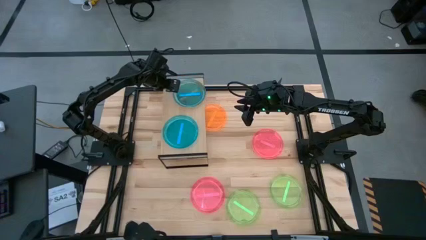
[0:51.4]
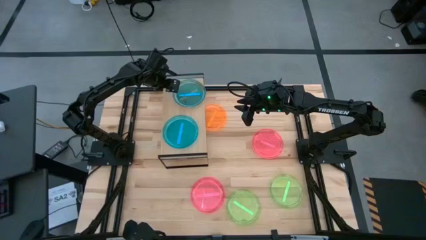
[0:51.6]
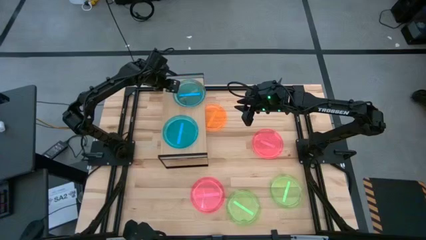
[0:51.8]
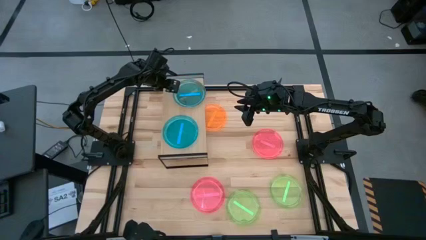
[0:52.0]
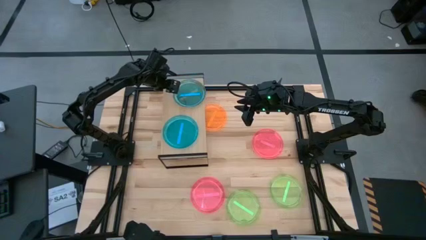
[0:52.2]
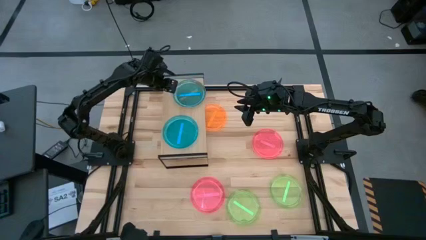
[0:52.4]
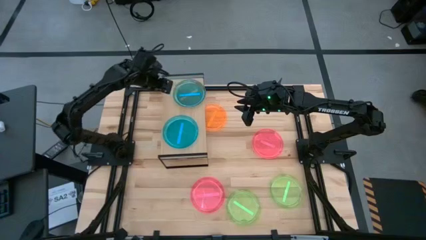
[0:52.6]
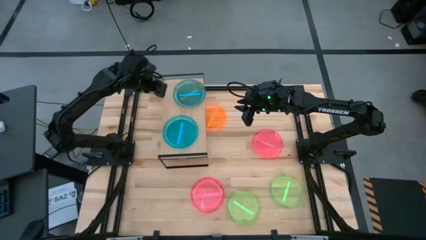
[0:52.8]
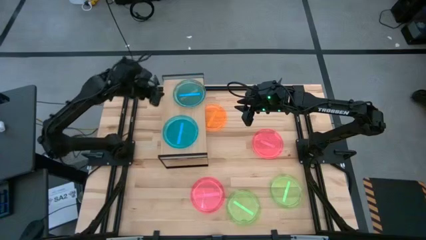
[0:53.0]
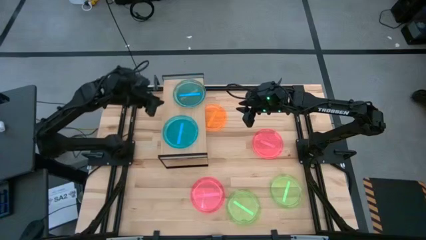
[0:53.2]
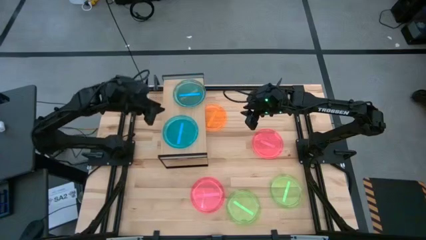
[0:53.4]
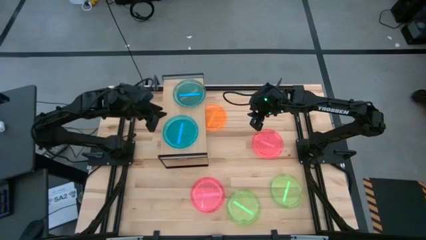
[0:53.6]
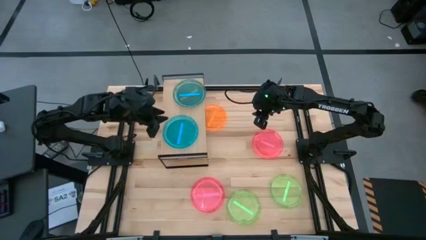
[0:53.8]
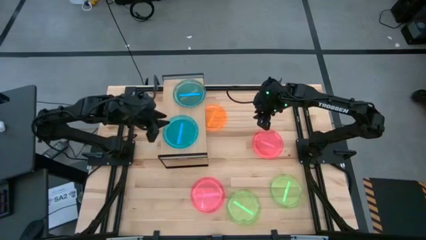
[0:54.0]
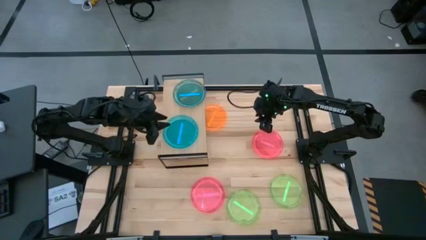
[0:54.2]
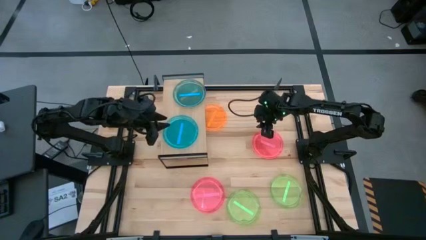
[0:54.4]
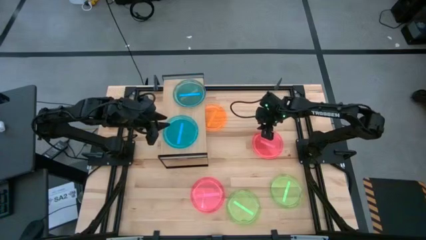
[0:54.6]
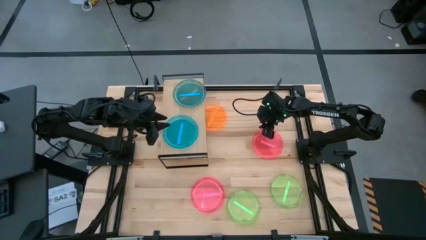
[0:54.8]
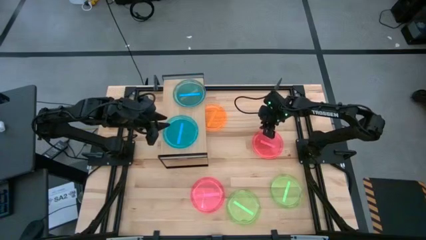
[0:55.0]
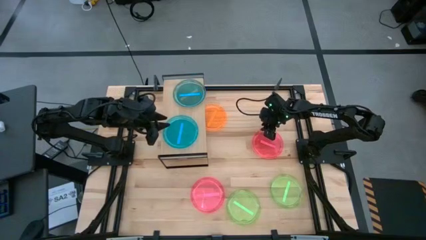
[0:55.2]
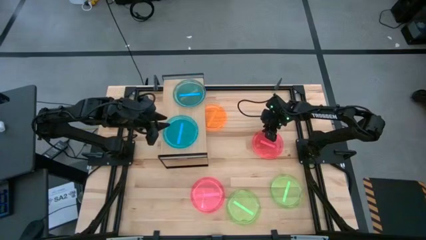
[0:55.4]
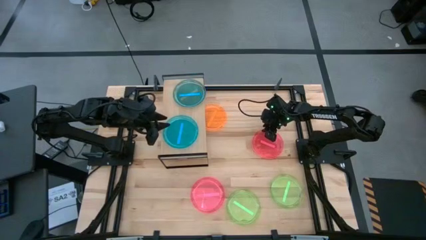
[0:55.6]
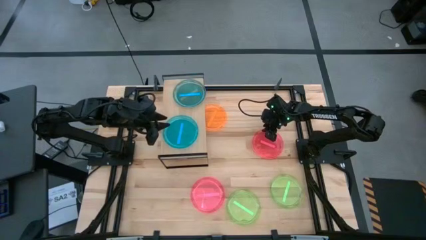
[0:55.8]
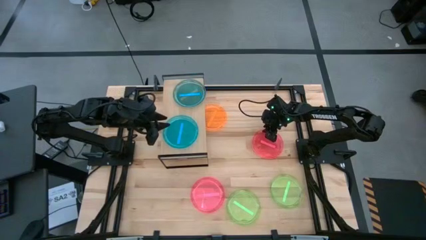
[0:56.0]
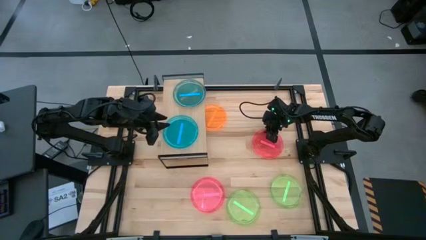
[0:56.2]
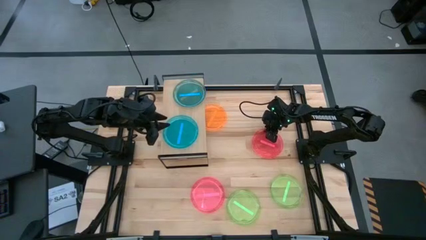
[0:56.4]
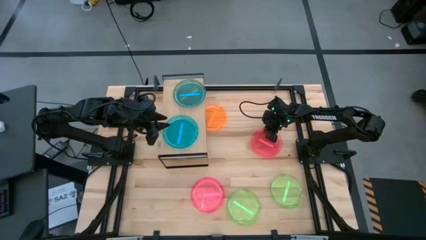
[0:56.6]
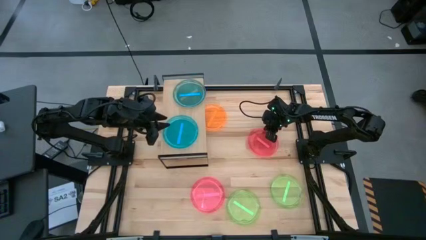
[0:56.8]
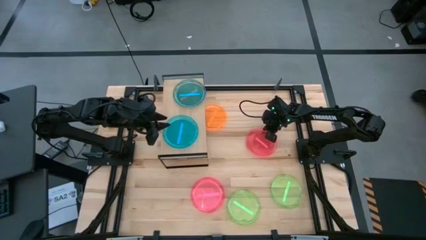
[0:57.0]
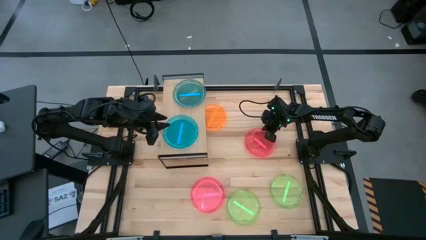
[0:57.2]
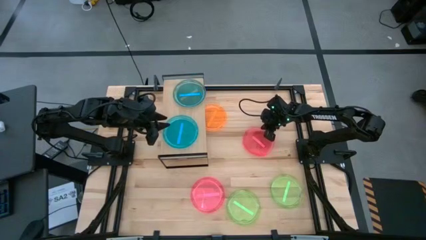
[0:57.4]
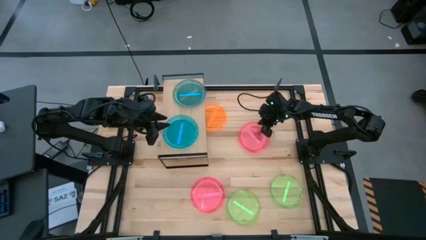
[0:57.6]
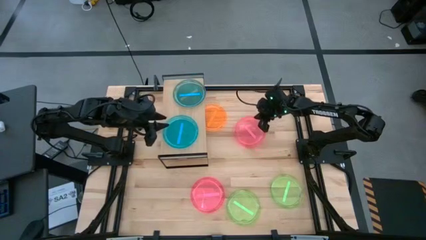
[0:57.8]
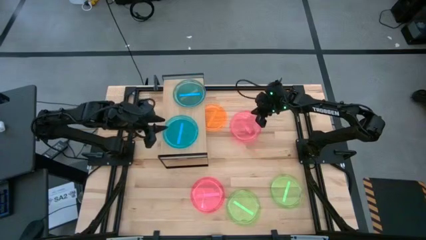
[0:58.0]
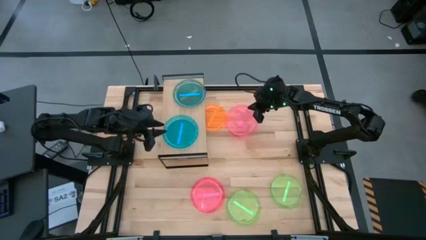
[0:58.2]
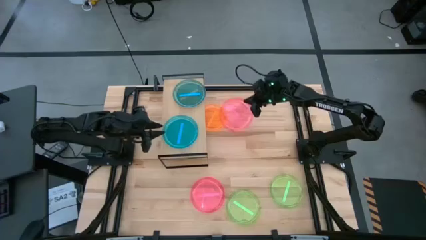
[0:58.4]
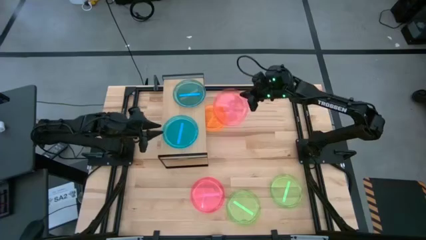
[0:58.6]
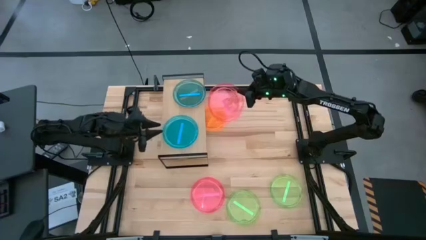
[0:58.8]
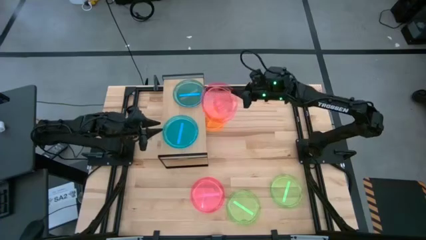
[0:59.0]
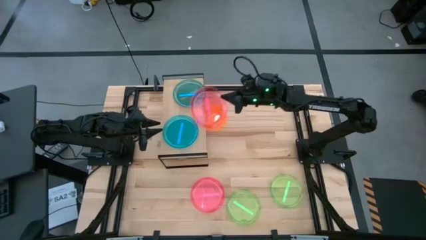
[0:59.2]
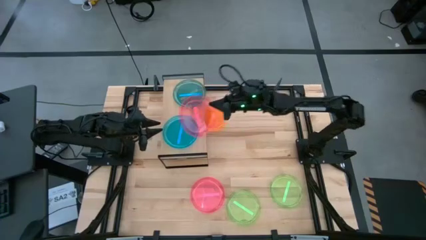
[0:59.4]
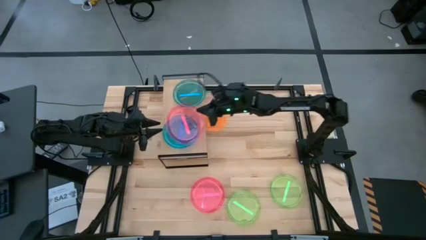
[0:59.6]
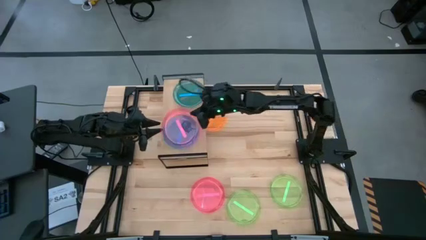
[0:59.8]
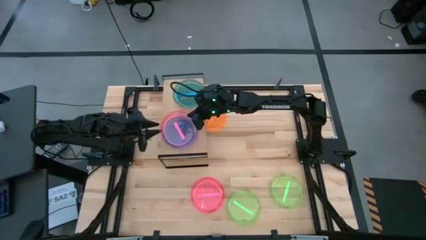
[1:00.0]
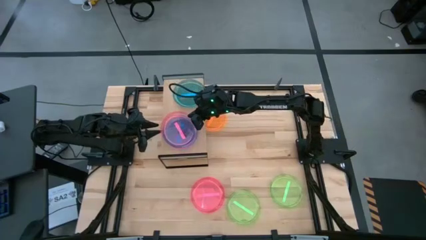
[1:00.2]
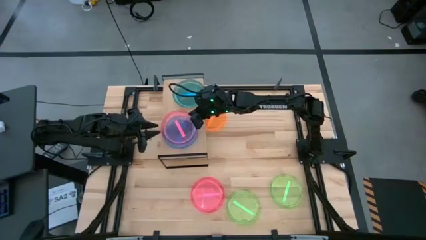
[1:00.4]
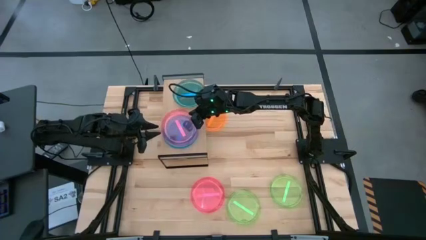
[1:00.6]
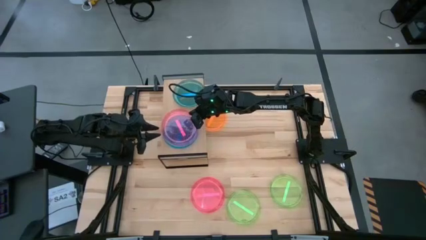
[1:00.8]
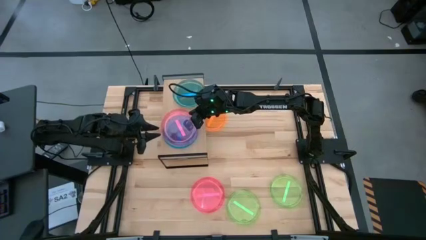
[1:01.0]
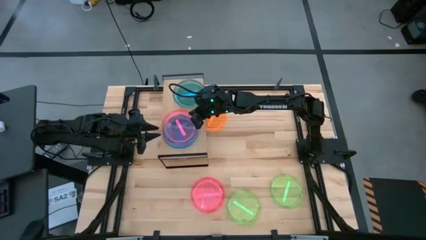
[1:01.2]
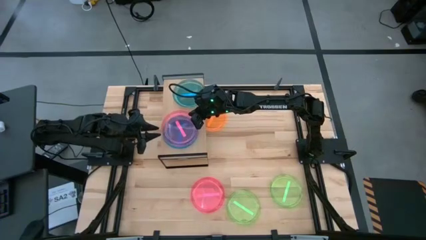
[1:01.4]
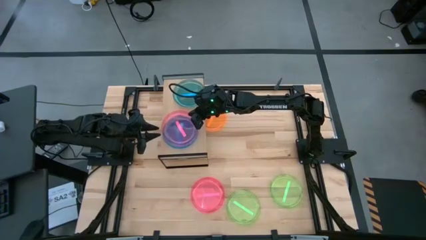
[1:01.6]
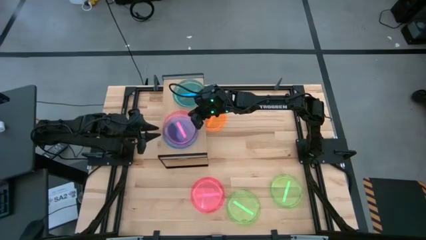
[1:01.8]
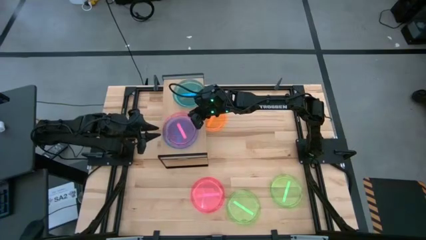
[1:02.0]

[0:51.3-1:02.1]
Task: Place and stack plates onto a shelf
Stack the top pink plate on top of the bottom blue plate on the shelf
